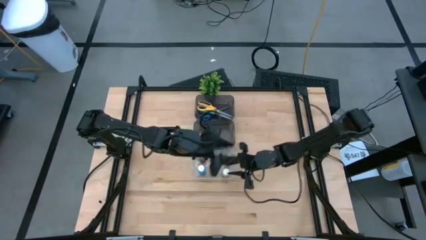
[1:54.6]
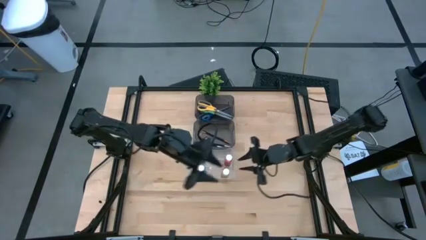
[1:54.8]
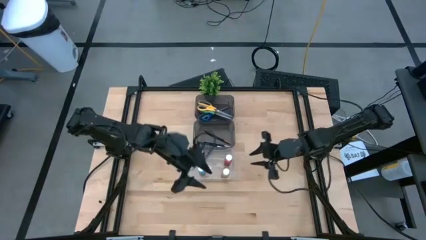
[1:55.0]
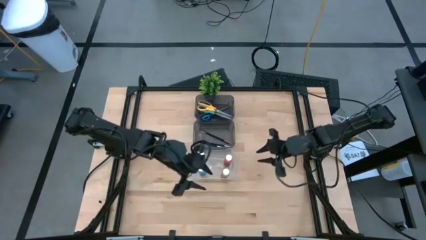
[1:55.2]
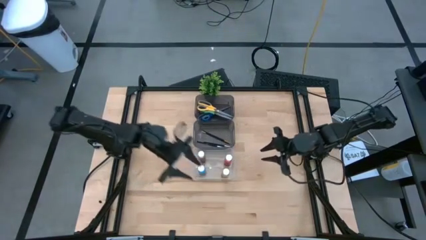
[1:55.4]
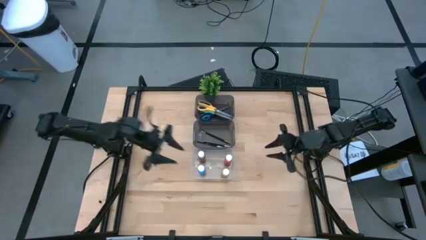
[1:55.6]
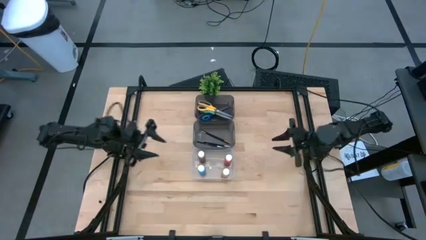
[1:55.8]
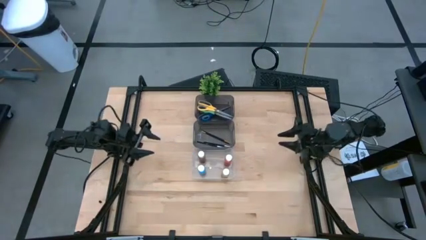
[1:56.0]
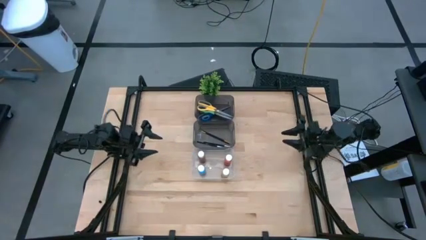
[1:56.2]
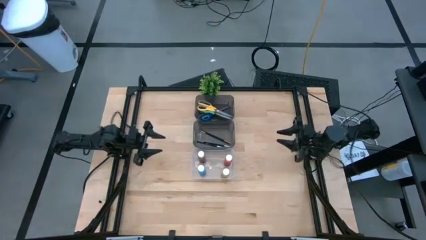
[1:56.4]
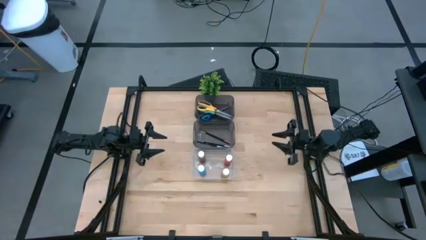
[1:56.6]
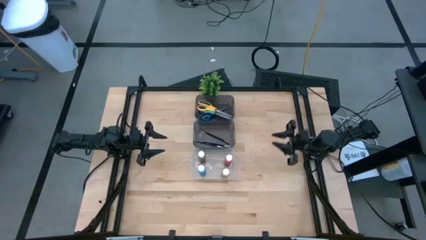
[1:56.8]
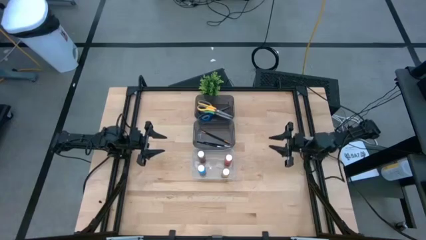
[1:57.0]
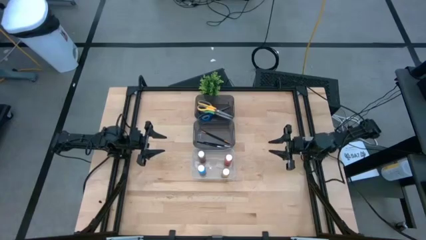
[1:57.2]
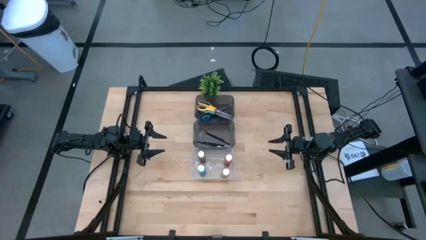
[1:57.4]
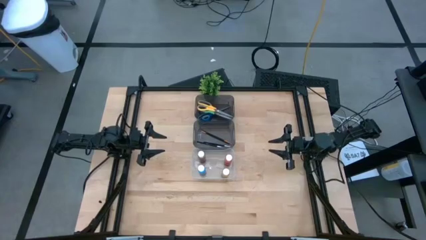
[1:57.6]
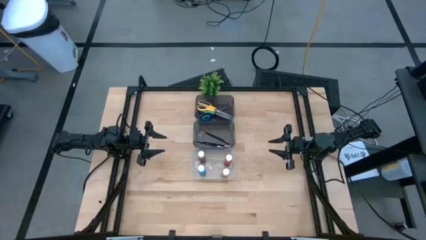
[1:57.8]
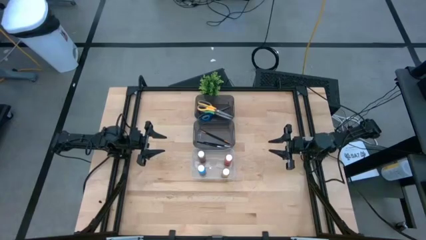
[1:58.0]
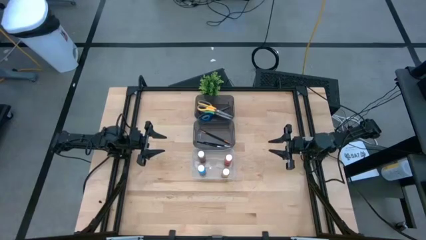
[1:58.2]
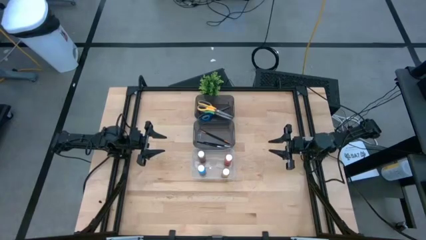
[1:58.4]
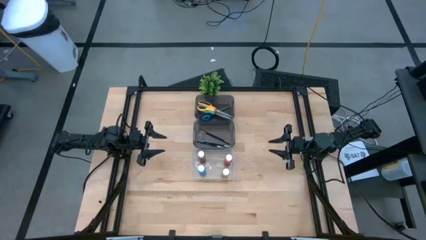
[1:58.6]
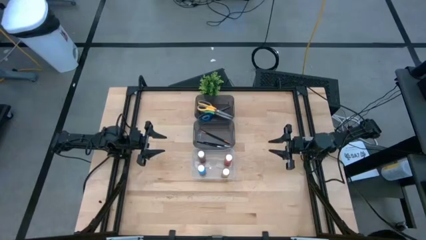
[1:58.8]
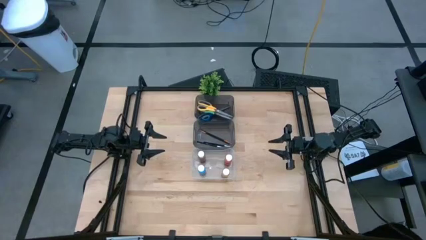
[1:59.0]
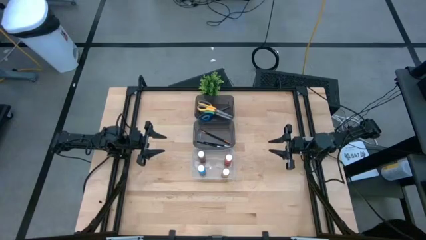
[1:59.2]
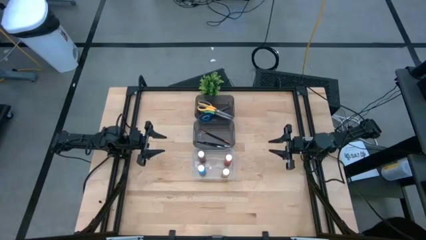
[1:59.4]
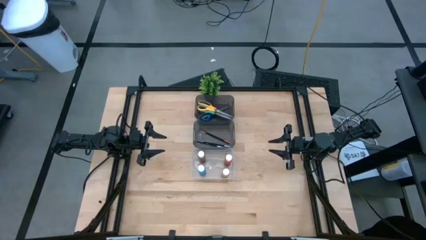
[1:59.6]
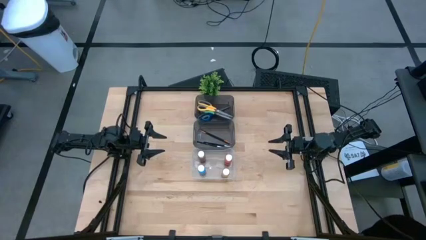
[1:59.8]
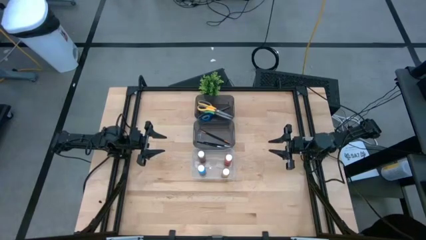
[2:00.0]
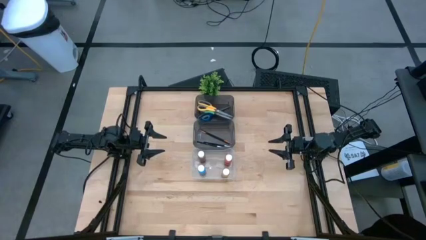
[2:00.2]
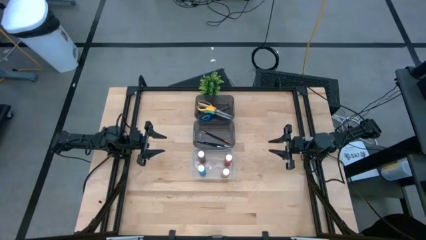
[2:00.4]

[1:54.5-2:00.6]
Task: Pick & Place Paint Supplies
Return to Home Position

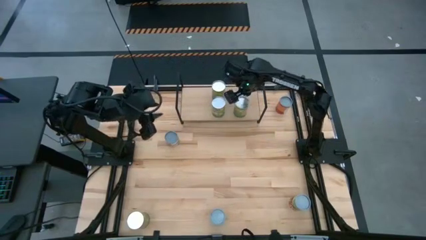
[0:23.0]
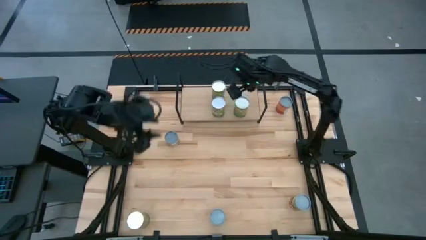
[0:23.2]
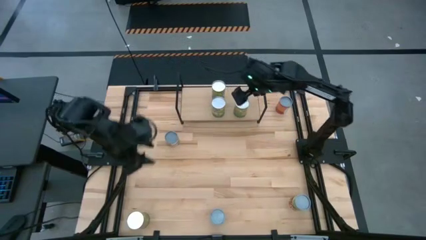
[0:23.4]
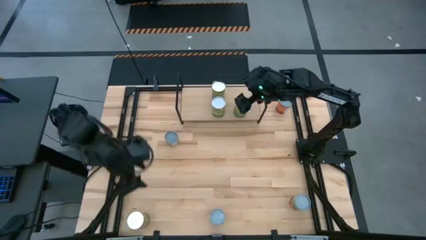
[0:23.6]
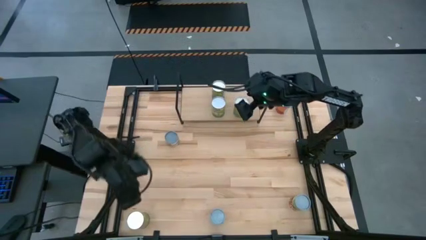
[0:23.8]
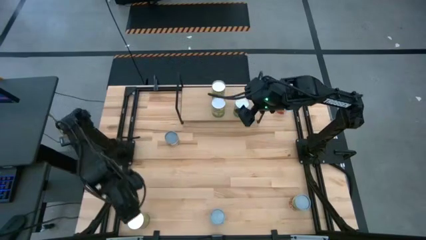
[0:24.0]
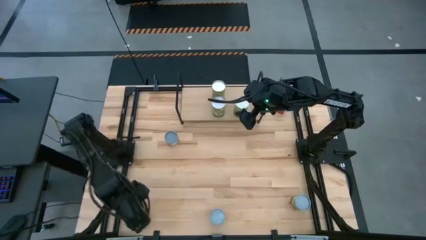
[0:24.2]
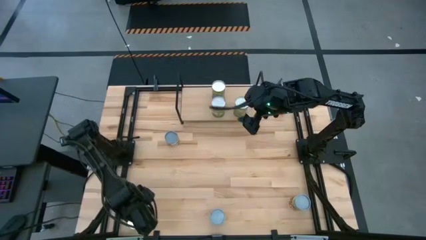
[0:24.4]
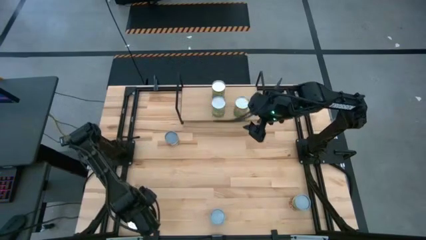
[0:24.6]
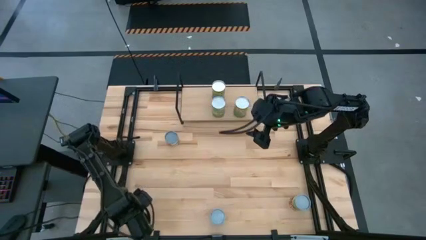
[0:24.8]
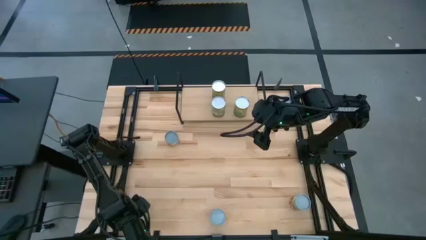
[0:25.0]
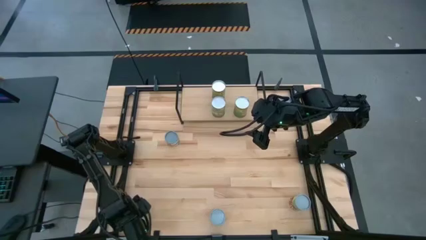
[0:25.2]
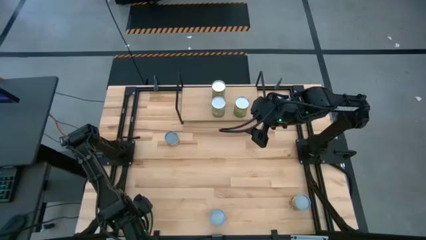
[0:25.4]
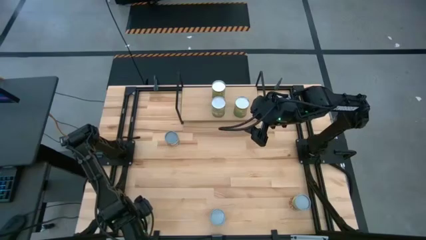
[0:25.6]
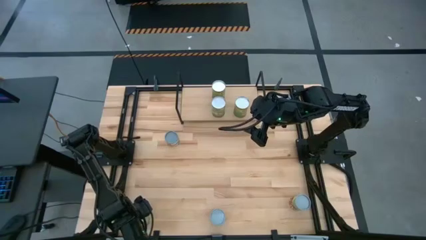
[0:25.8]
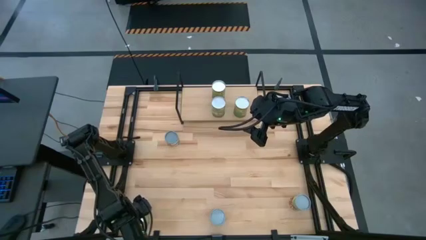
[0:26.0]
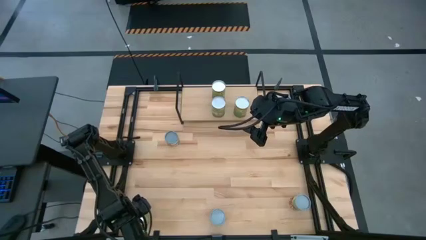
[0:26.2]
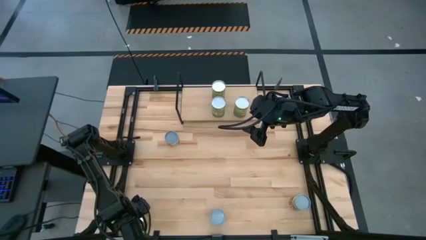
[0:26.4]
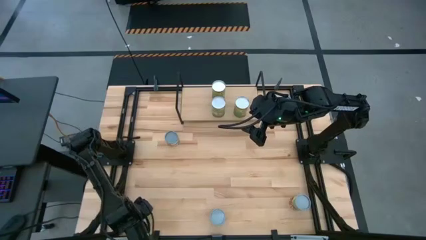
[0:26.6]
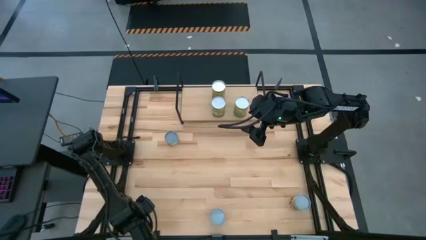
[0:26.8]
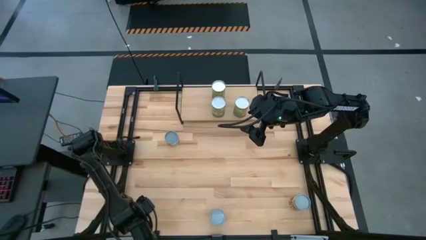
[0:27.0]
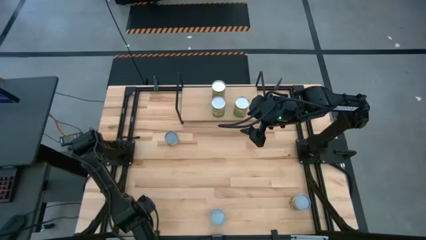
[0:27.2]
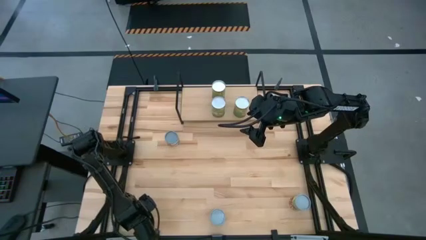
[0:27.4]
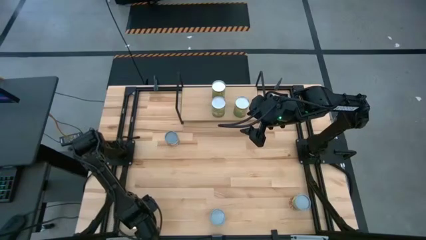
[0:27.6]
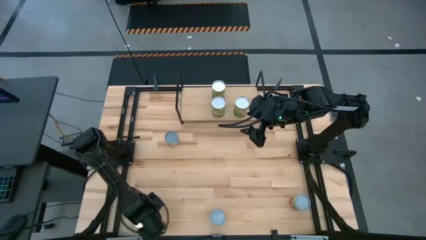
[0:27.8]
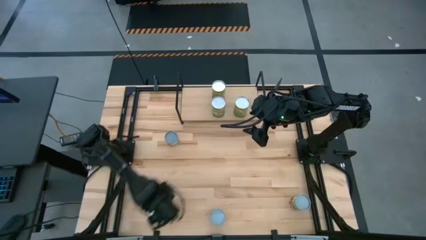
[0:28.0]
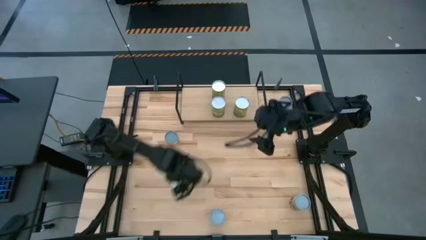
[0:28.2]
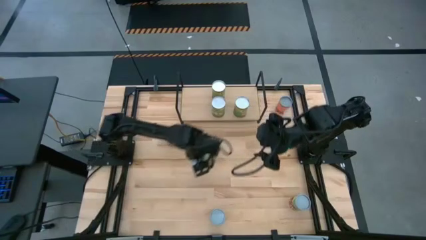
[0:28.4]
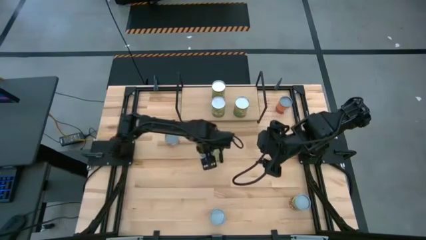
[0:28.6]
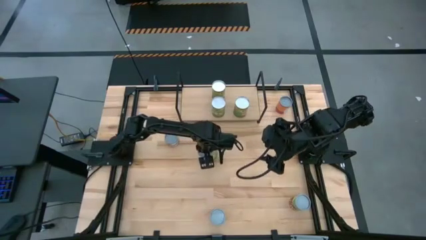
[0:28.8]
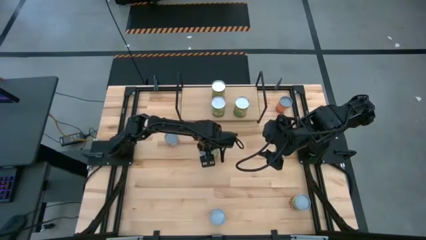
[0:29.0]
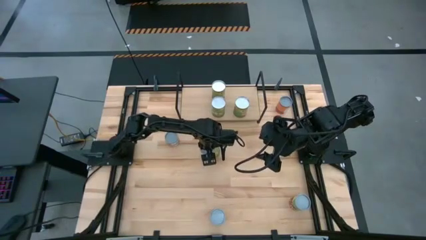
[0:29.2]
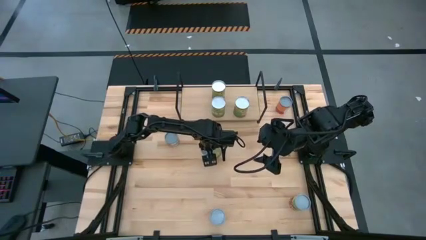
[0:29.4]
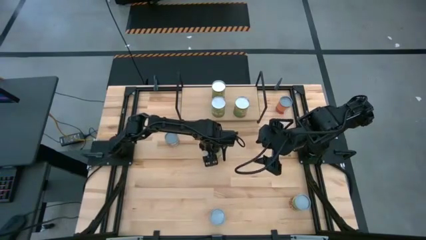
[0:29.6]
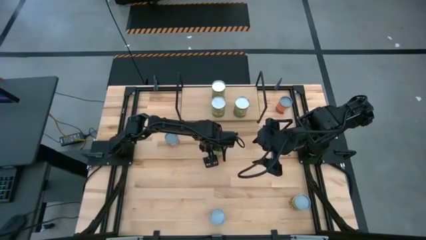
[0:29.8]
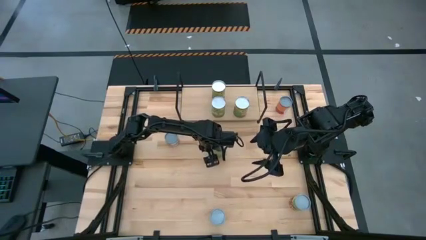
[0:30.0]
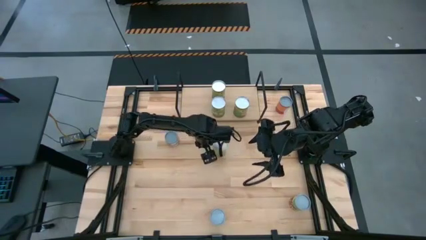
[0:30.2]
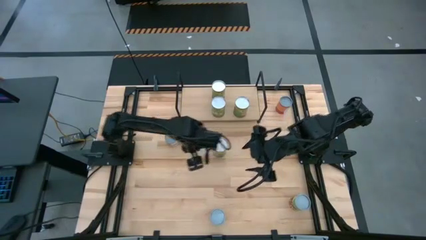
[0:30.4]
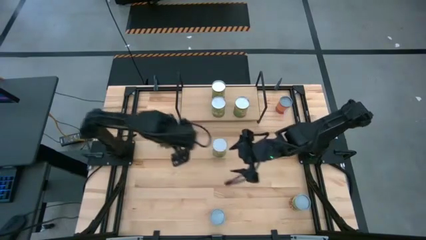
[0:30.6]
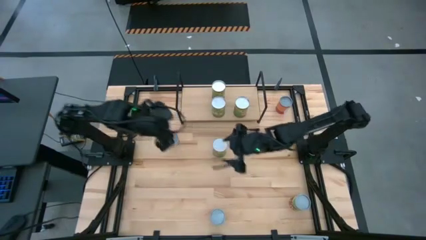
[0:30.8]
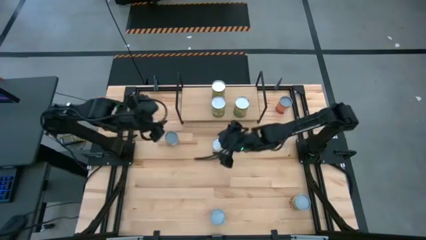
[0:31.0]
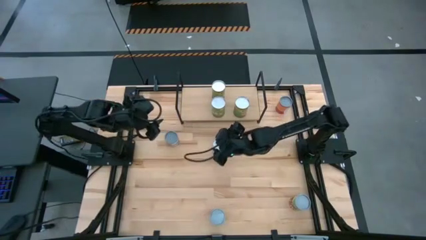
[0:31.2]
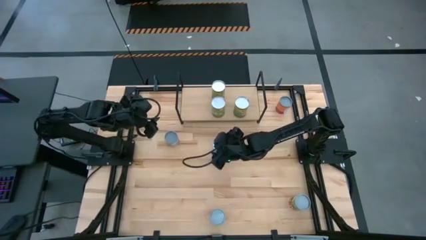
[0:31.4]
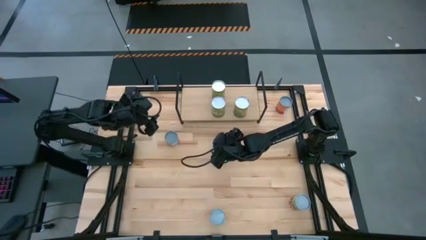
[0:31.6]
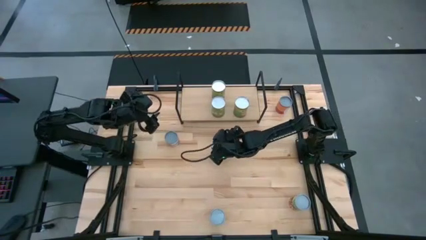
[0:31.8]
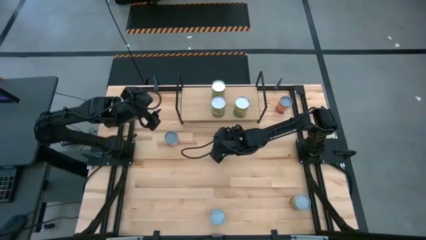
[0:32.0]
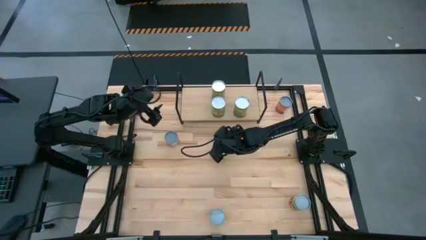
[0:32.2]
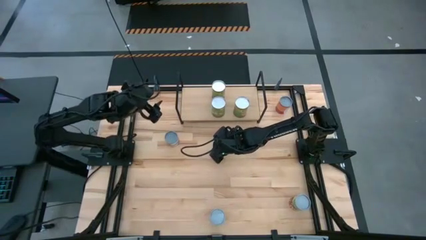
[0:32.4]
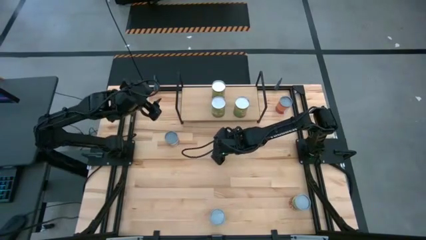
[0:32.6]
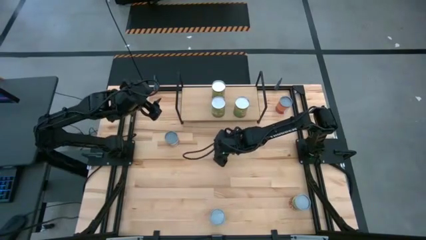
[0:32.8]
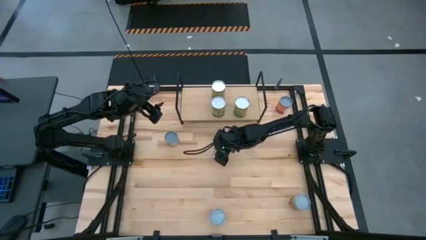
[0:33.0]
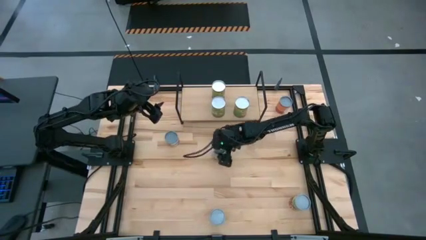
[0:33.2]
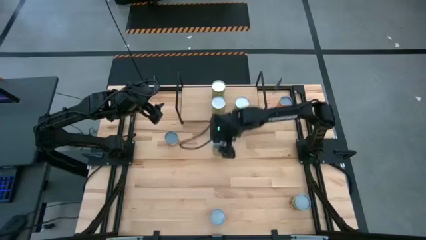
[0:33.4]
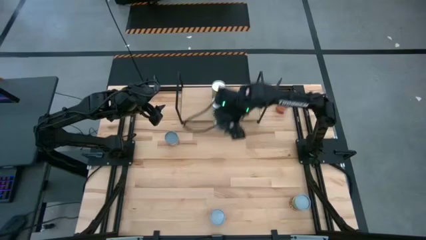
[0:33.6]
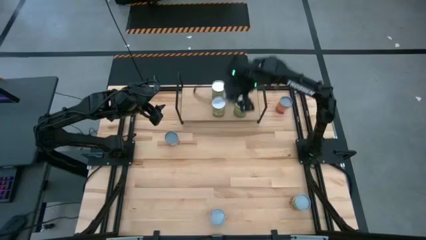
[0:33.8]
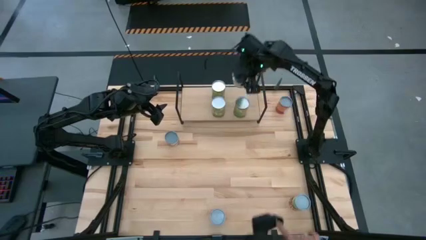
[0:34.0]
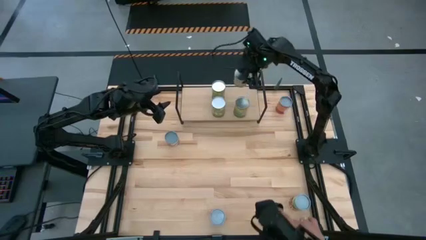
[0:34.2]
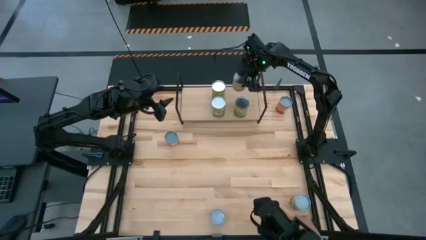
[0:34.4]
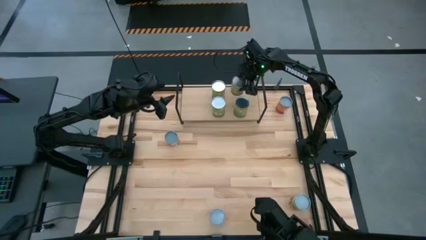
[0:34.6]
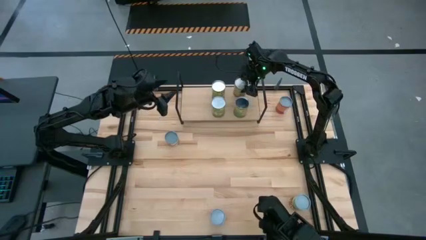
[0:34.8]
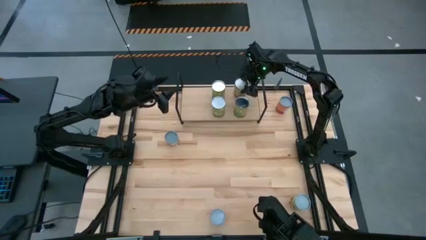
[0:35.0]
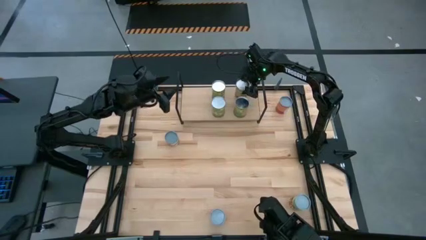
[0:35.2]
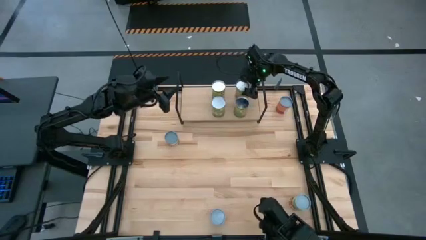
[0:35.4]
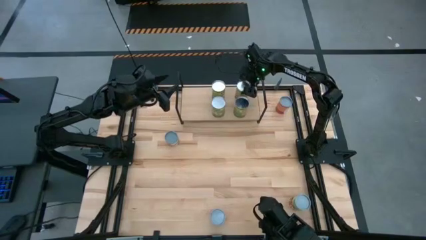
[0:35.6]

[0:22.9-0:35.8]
Task: Pick and place cans onto a shelf
Put the large canned oranges on the shelf aligned with the other large canned oranges
